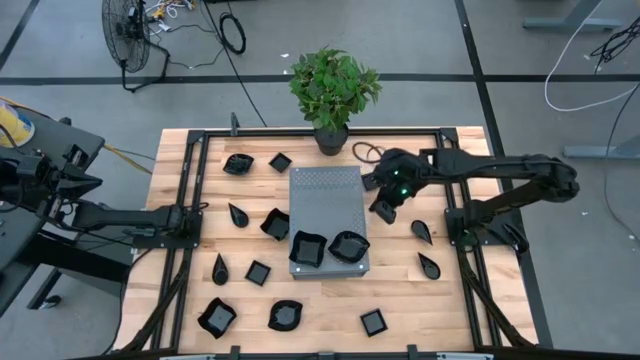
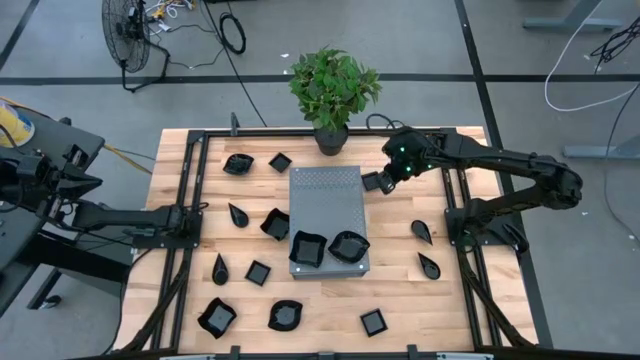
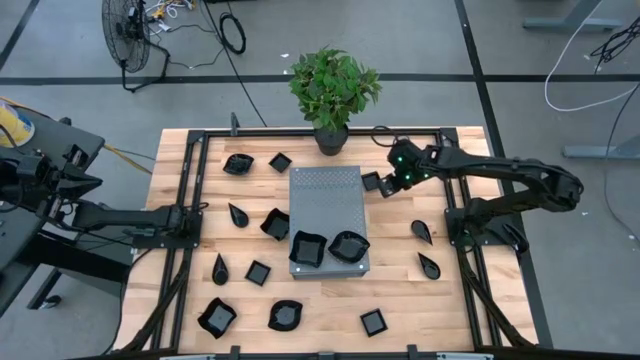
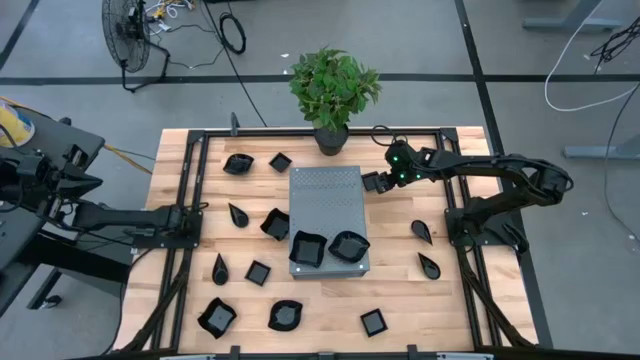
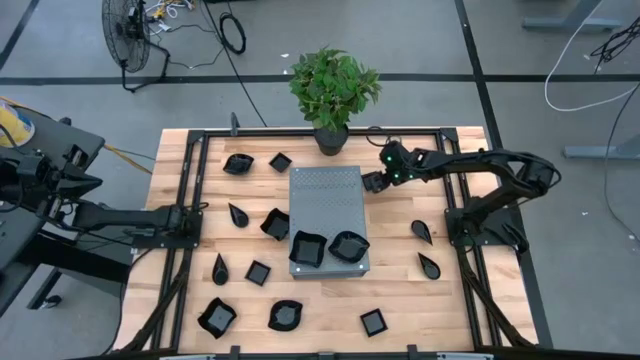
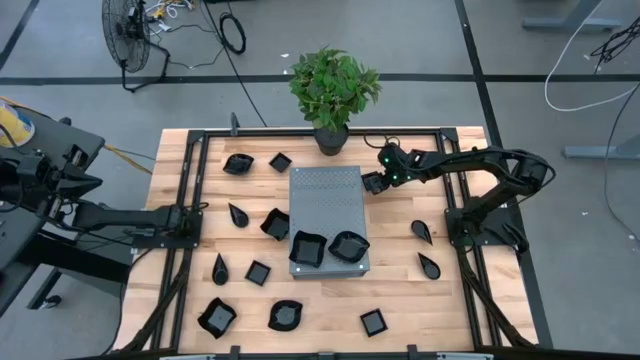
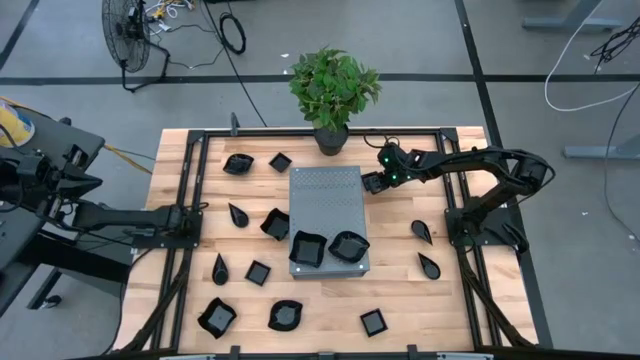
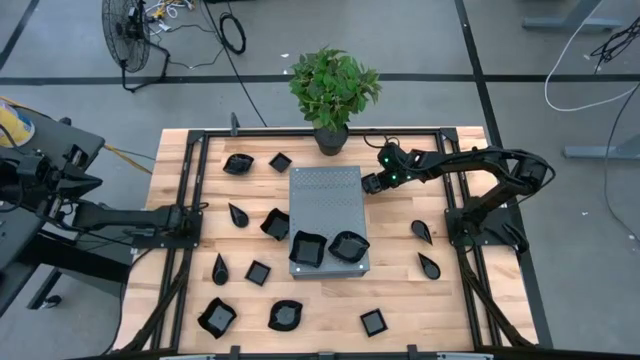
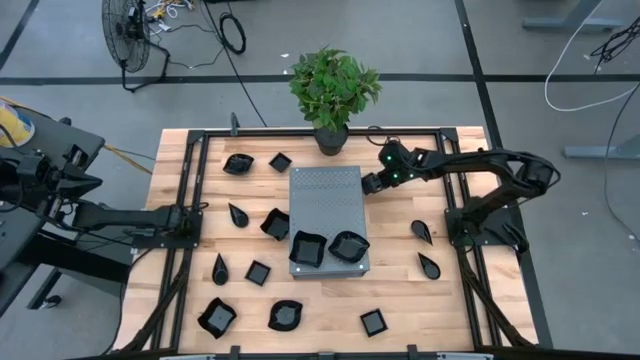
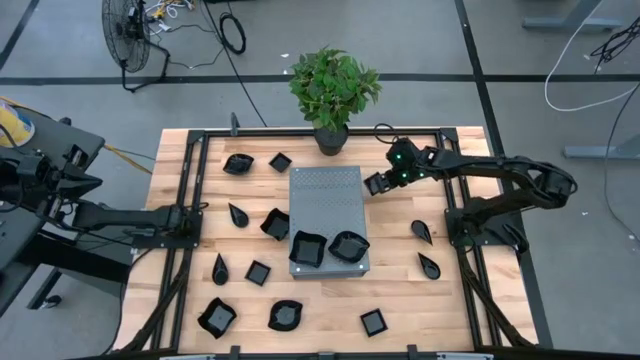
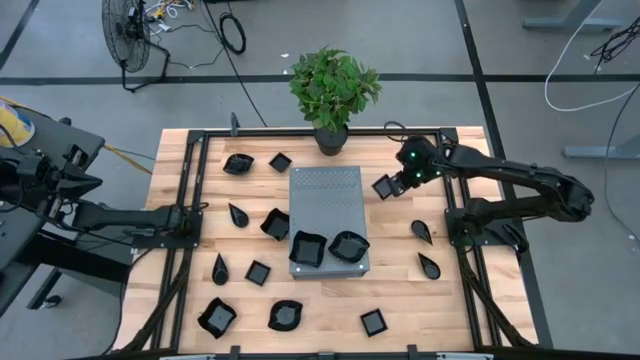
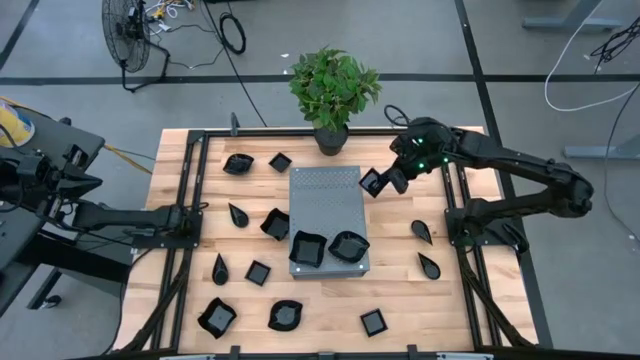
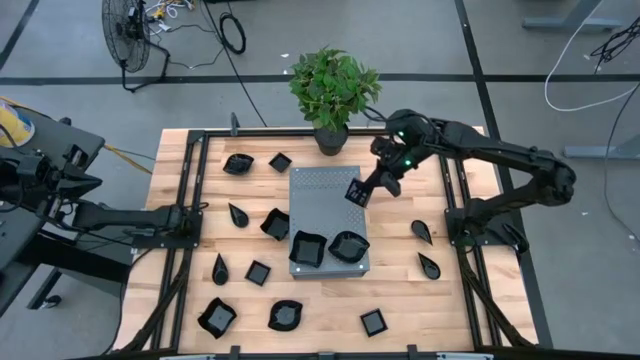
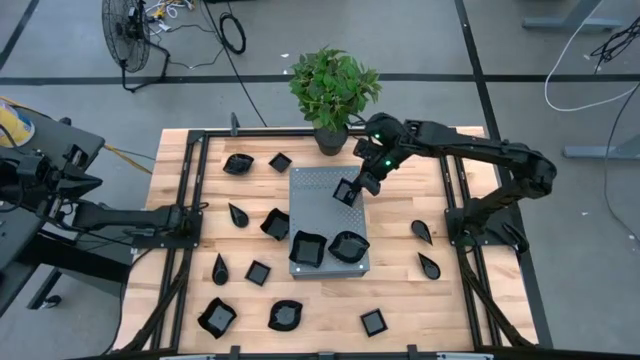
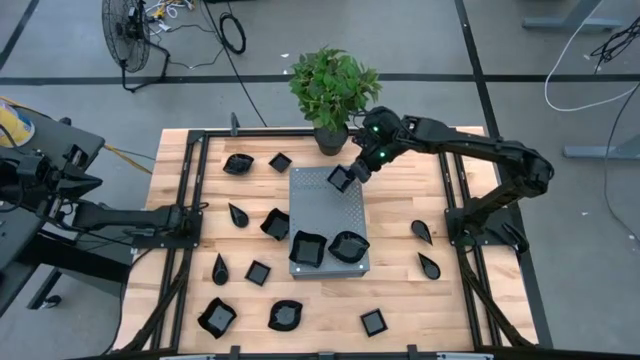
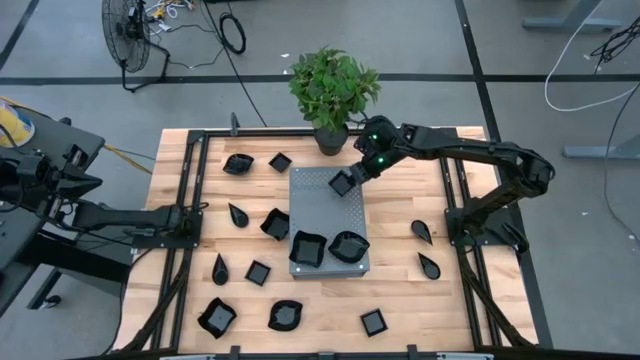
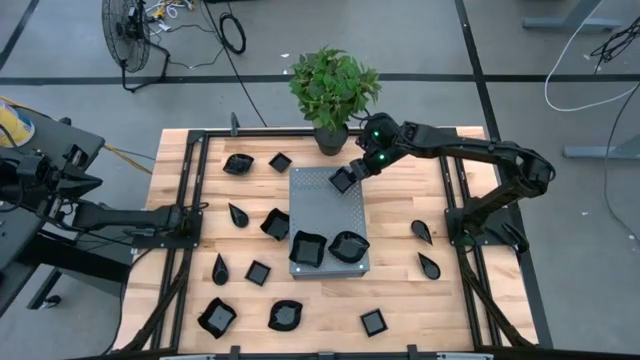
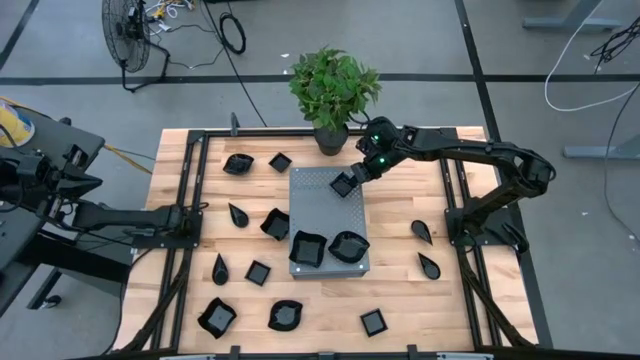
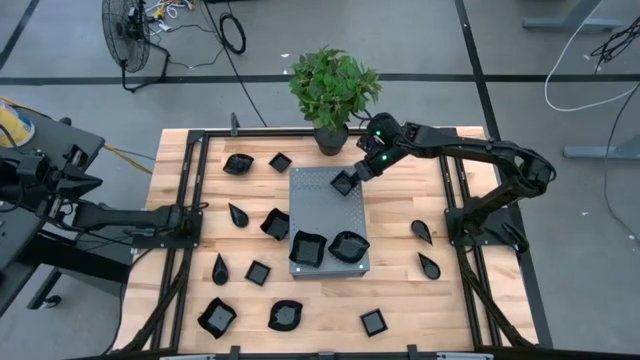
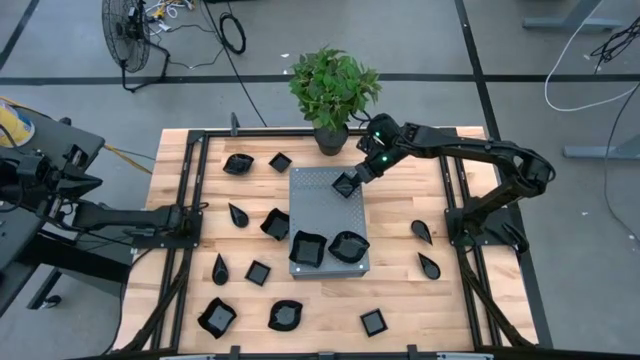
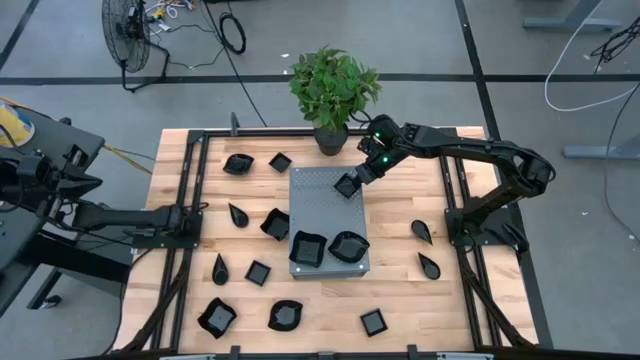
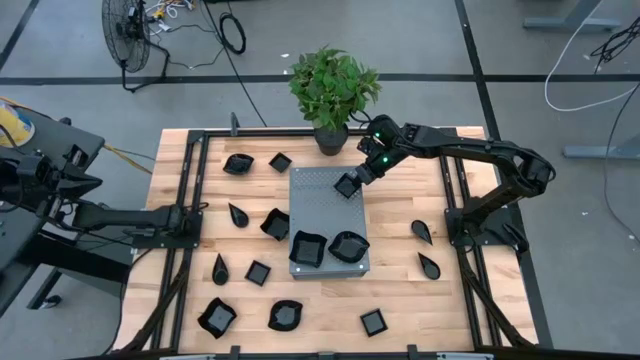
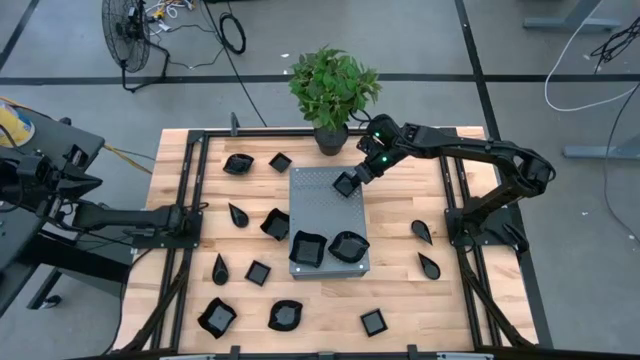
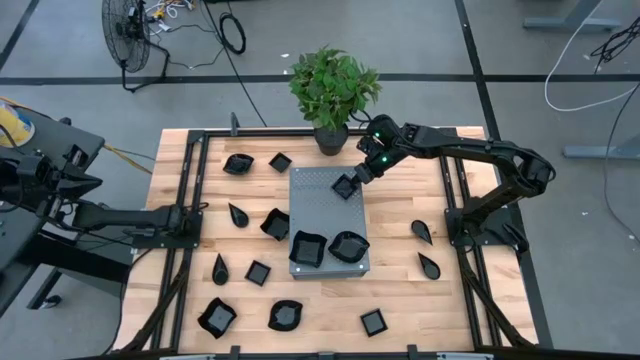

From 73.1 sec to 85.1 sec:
Task: Pick & Place Mini shaped plates
Put the black bowl on the shelf

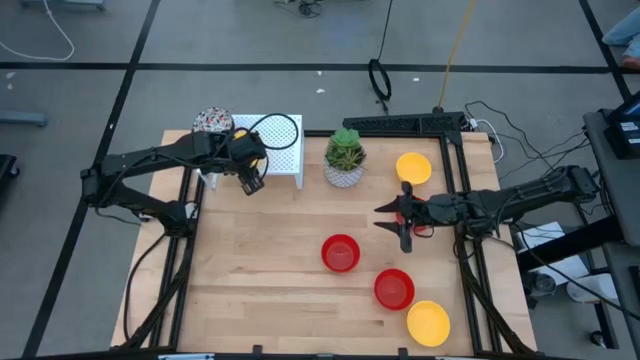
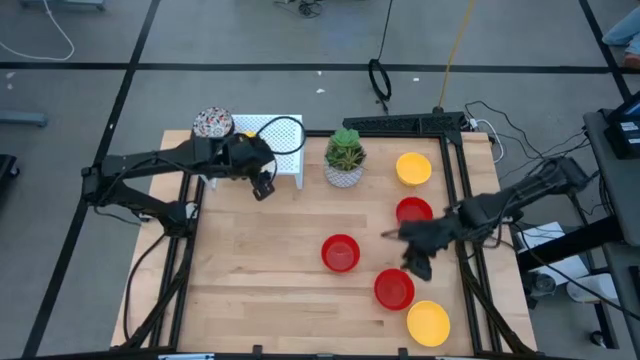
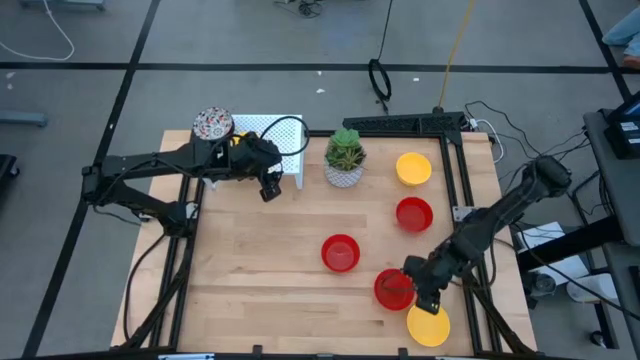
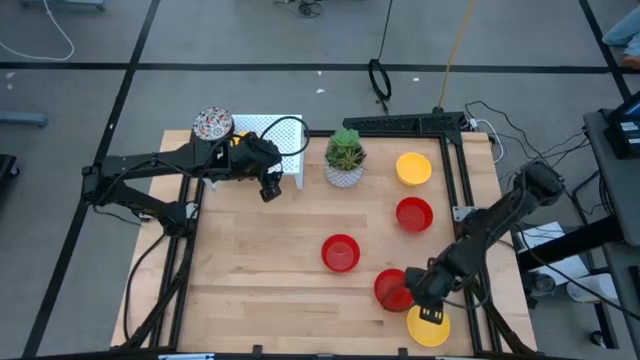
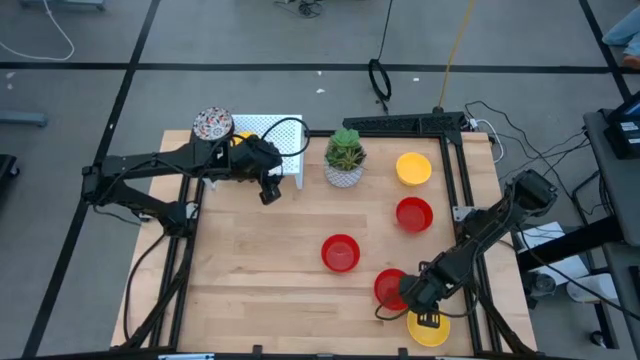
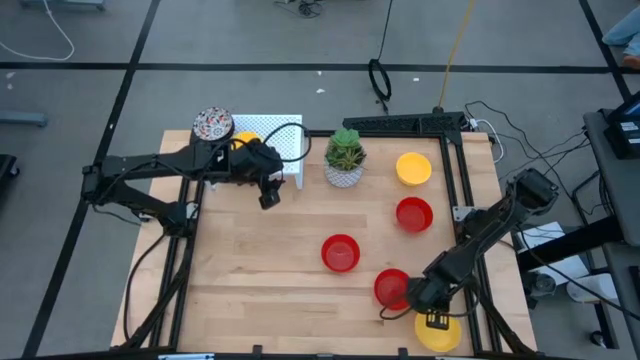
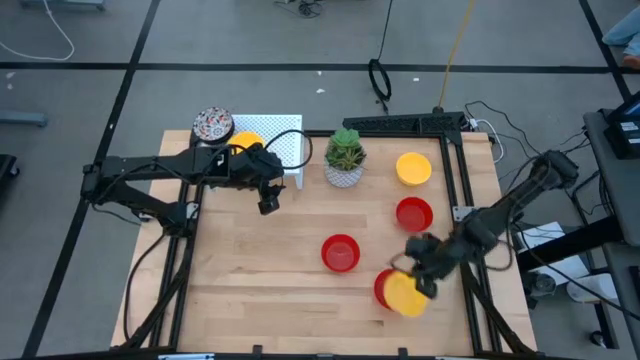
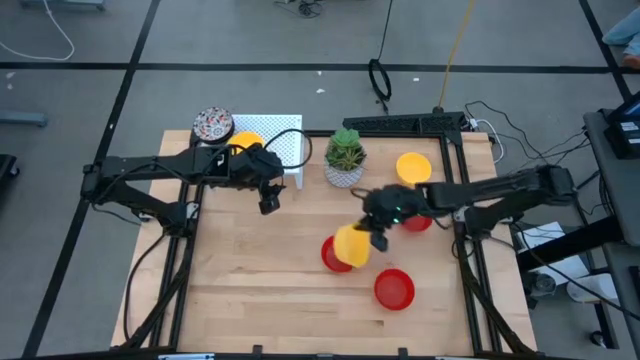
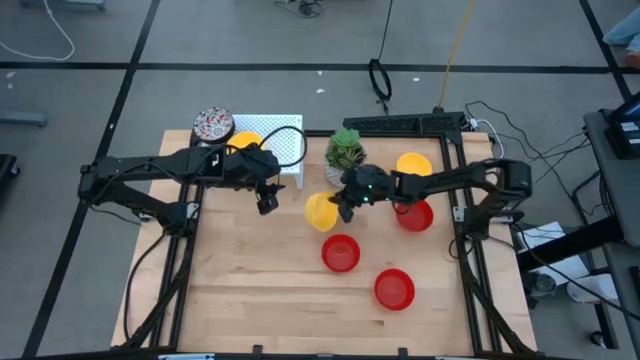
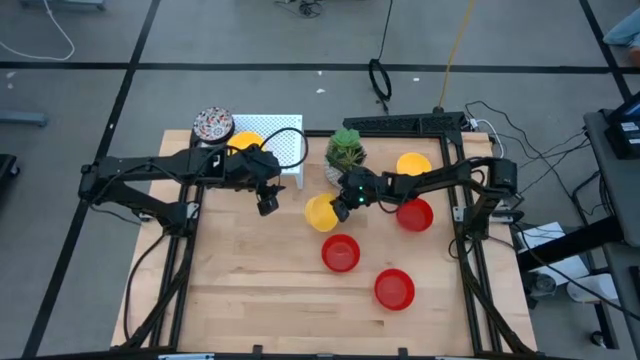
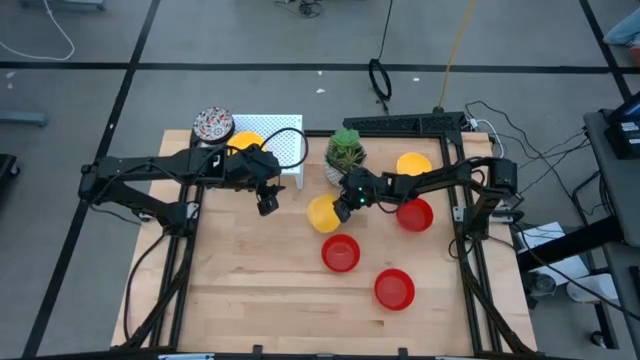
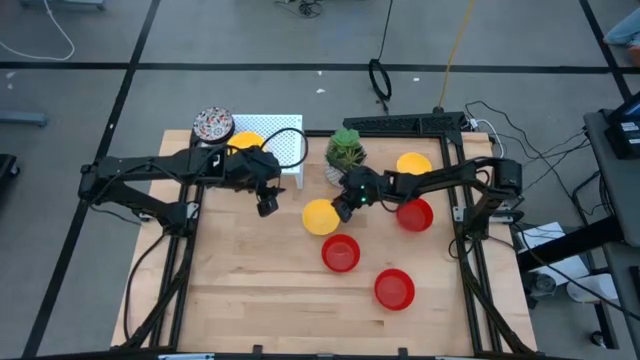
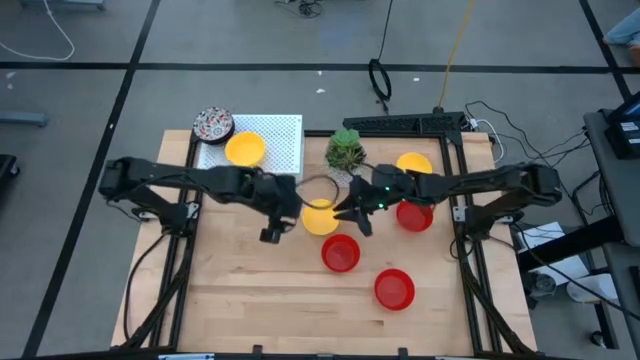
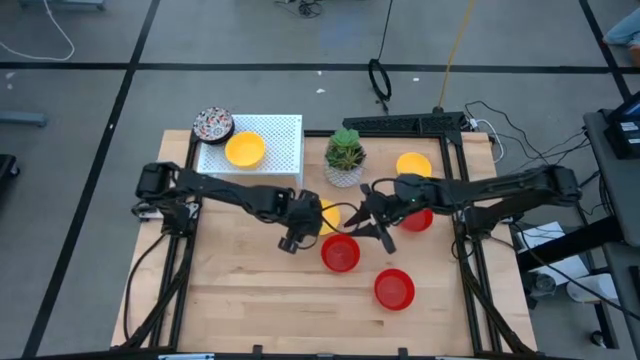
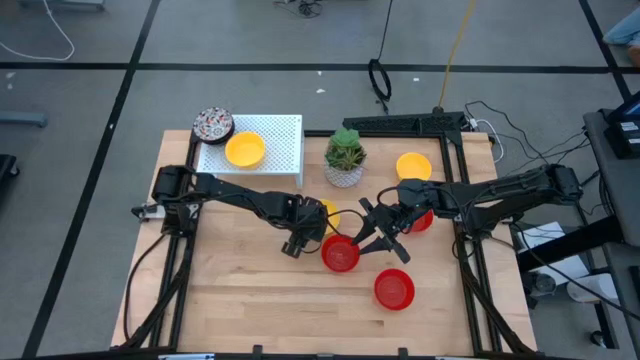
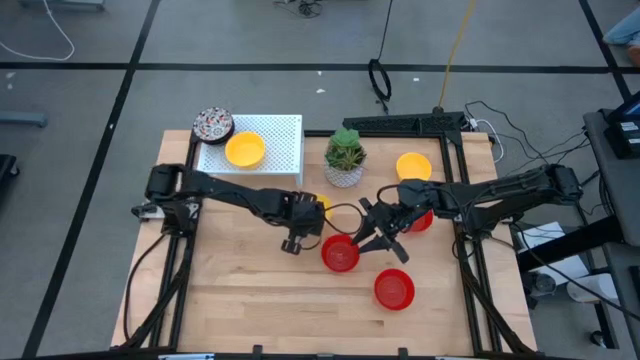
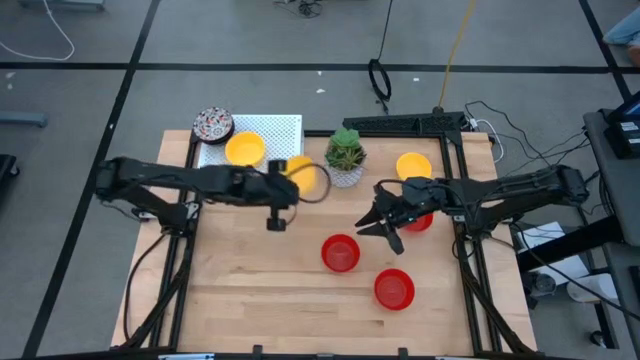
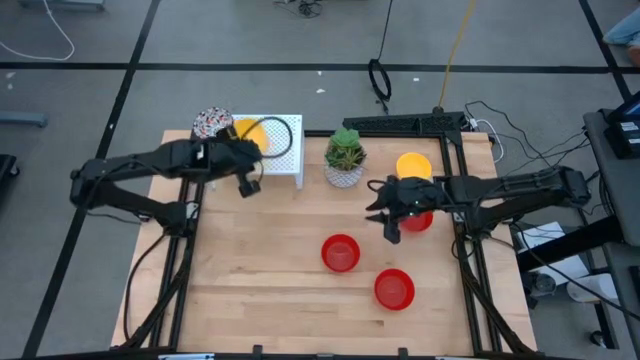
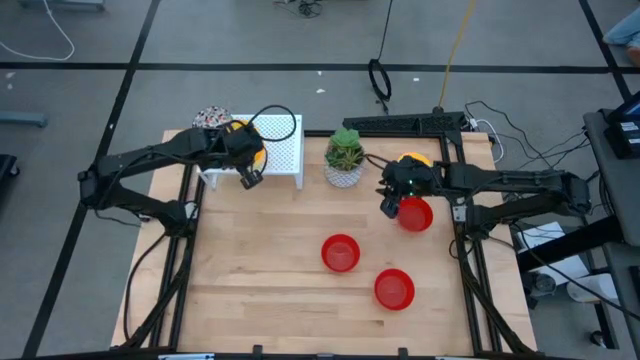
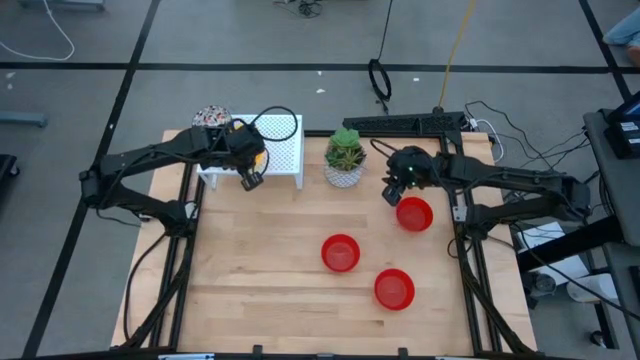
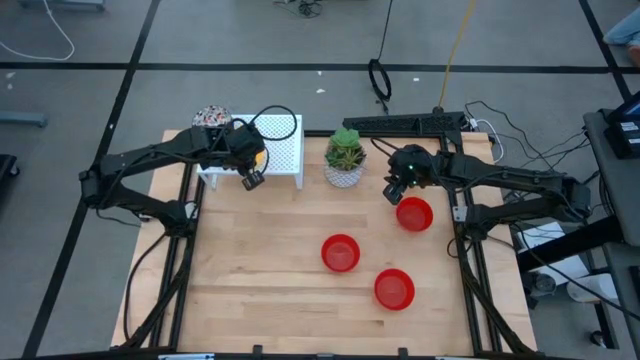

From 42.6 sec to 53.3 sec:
Task: Pick & Place Mini bowls
Stack the yellow bowl on top of the yellow bowl on the shelf
